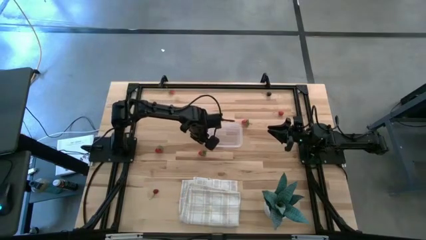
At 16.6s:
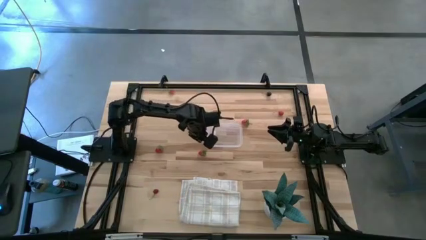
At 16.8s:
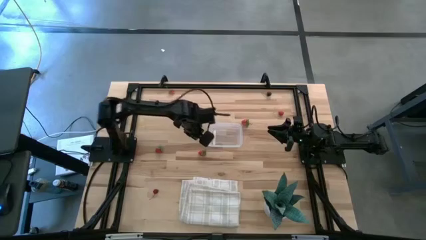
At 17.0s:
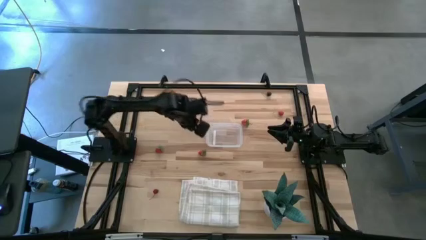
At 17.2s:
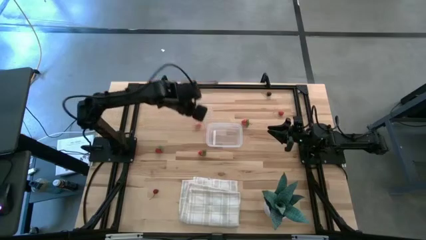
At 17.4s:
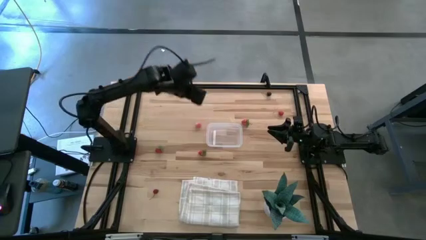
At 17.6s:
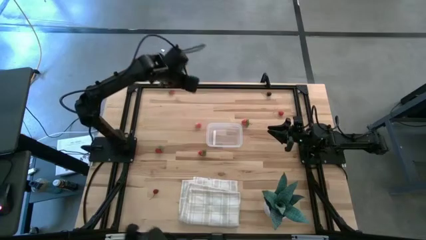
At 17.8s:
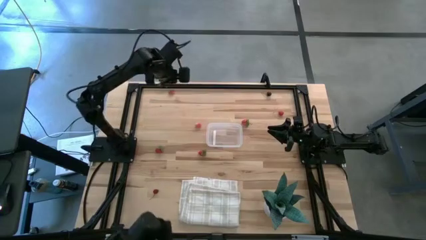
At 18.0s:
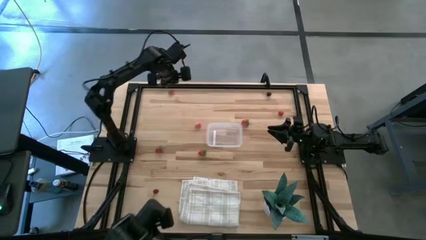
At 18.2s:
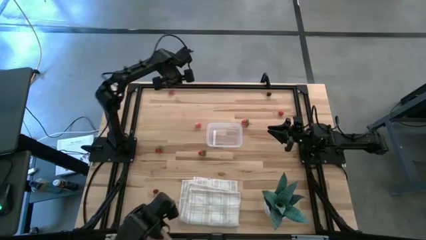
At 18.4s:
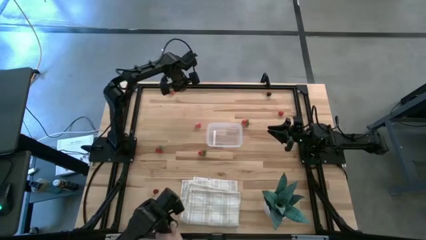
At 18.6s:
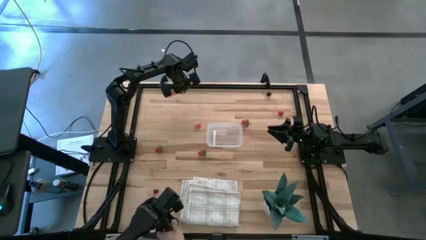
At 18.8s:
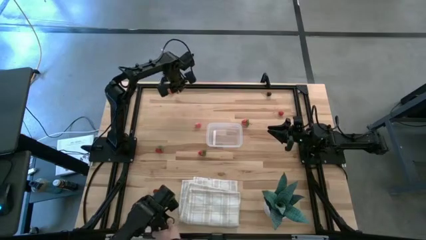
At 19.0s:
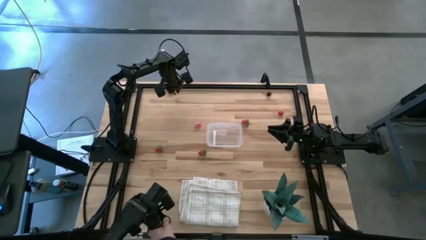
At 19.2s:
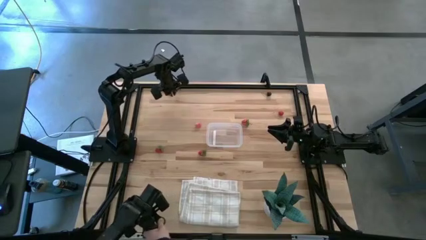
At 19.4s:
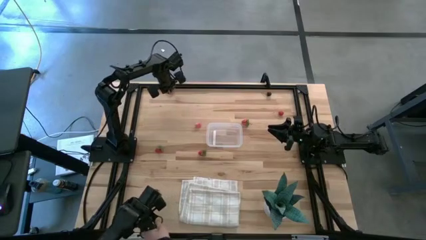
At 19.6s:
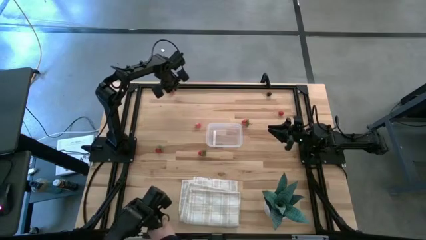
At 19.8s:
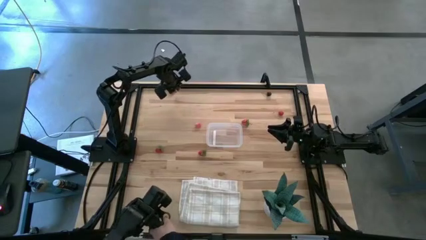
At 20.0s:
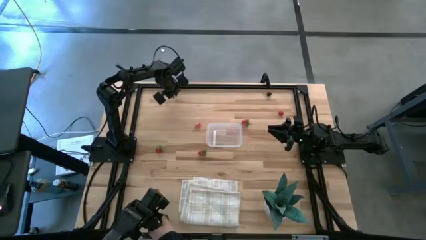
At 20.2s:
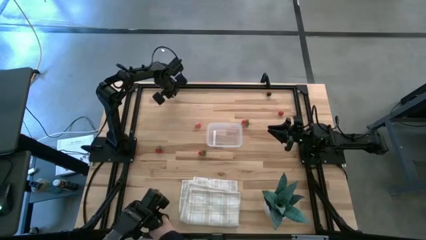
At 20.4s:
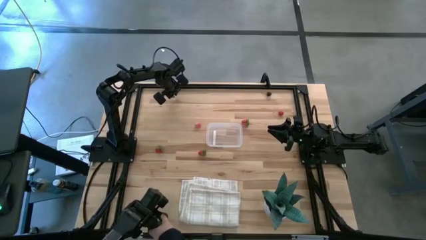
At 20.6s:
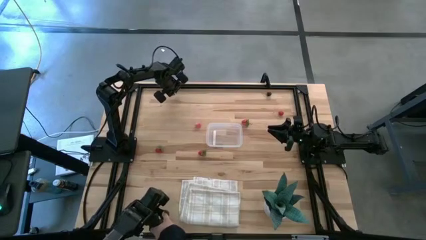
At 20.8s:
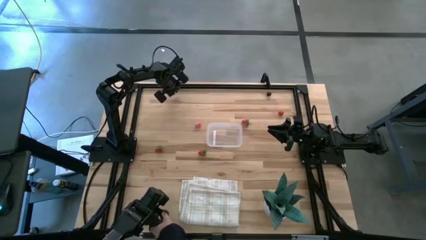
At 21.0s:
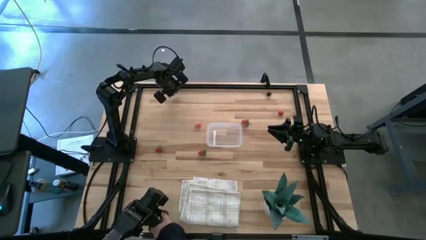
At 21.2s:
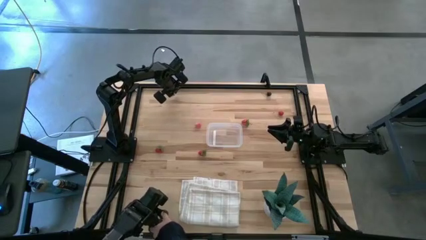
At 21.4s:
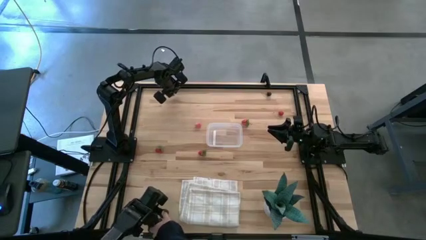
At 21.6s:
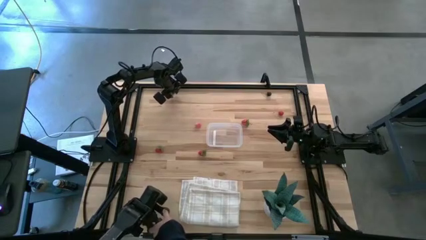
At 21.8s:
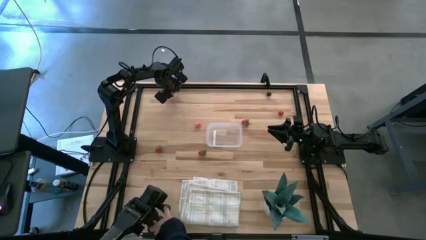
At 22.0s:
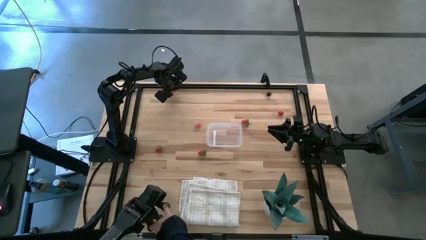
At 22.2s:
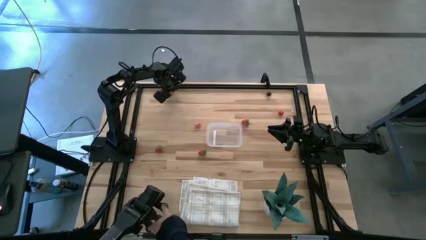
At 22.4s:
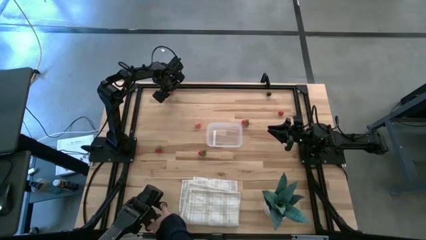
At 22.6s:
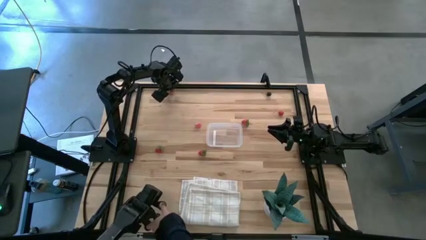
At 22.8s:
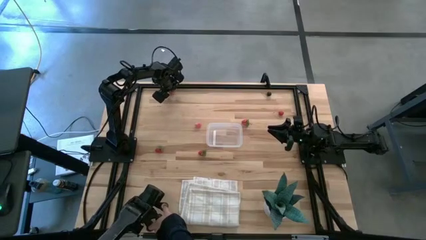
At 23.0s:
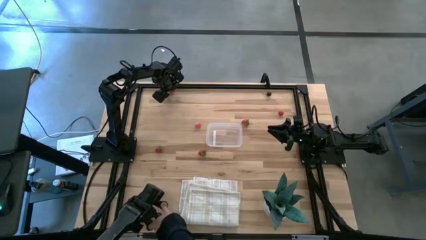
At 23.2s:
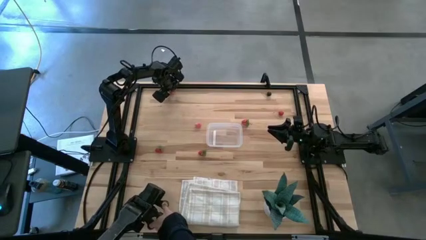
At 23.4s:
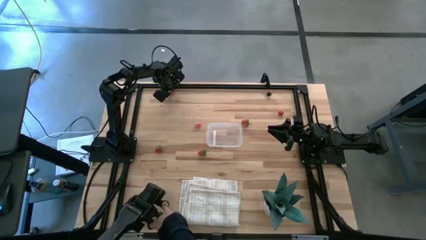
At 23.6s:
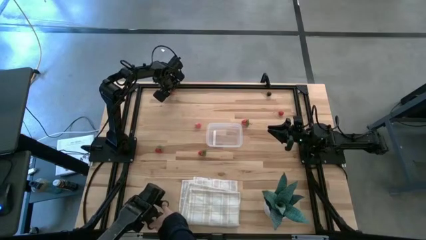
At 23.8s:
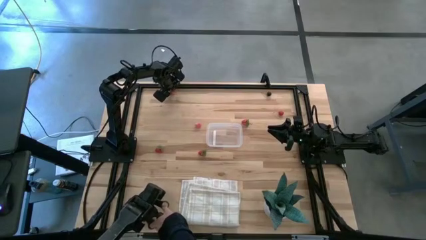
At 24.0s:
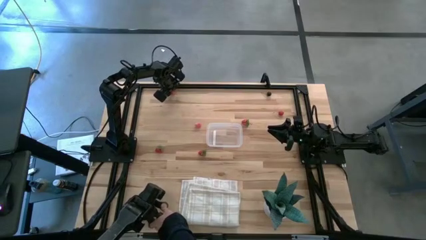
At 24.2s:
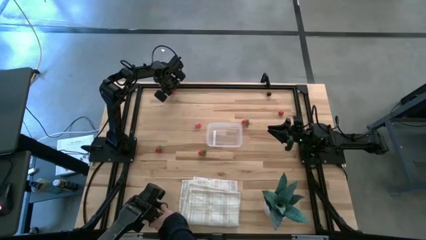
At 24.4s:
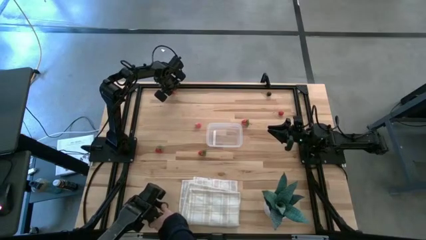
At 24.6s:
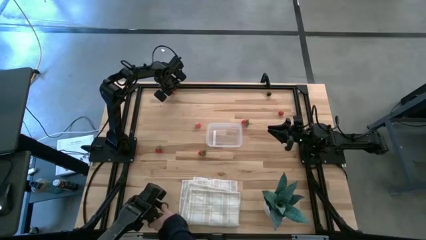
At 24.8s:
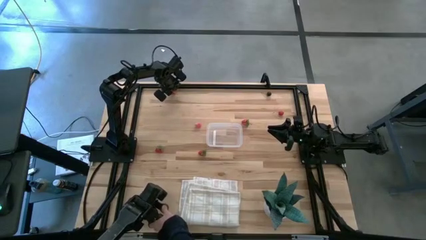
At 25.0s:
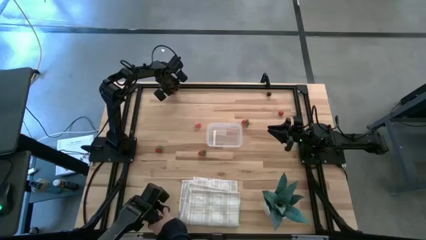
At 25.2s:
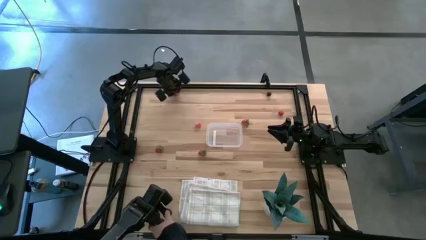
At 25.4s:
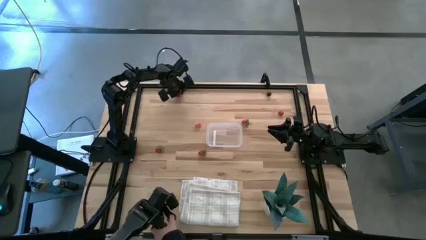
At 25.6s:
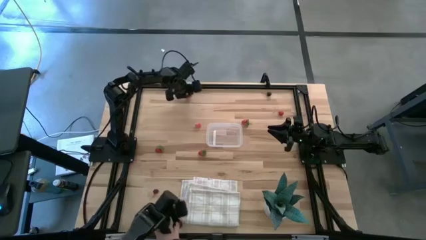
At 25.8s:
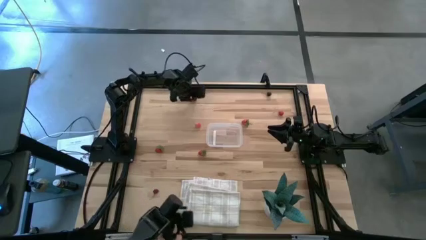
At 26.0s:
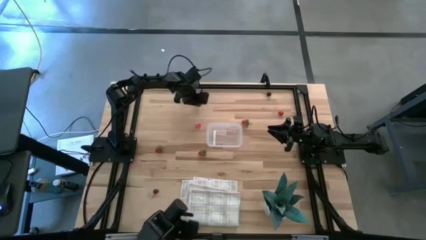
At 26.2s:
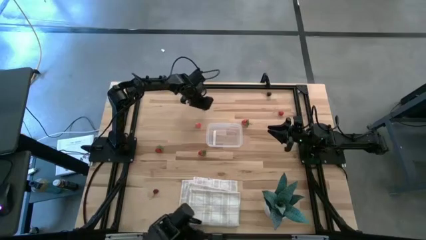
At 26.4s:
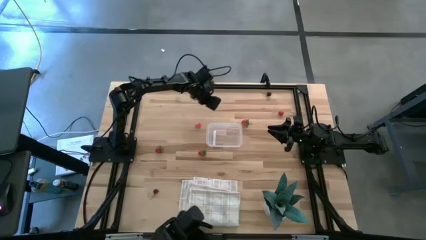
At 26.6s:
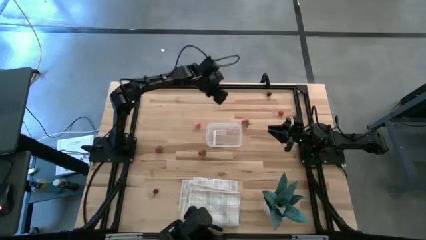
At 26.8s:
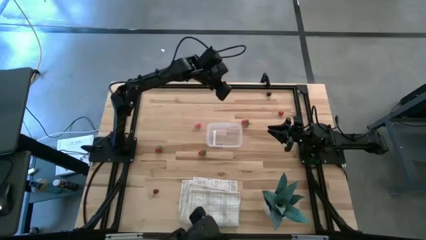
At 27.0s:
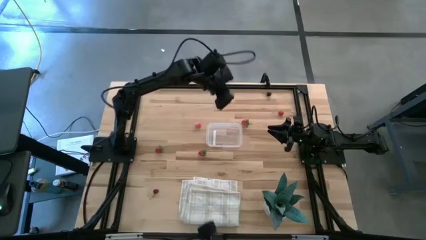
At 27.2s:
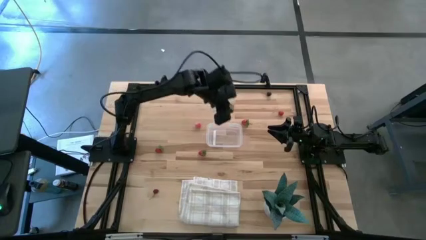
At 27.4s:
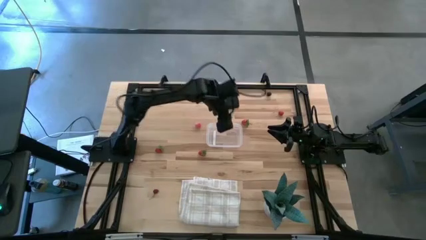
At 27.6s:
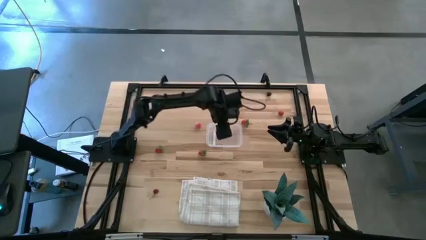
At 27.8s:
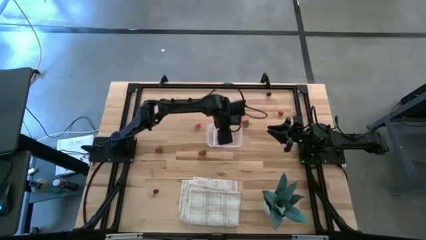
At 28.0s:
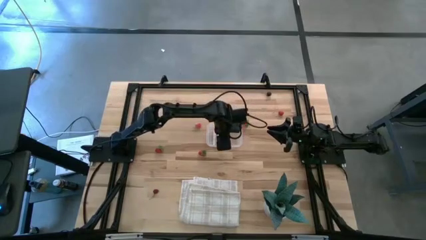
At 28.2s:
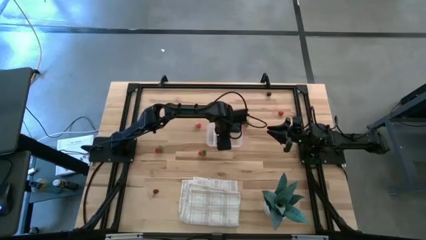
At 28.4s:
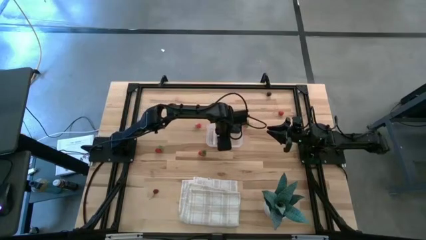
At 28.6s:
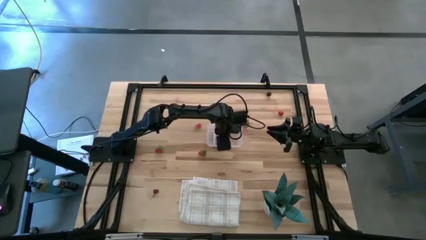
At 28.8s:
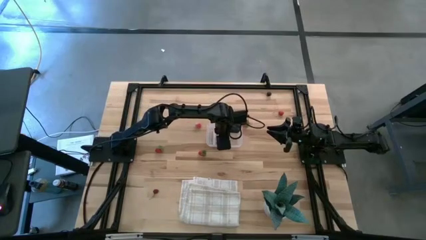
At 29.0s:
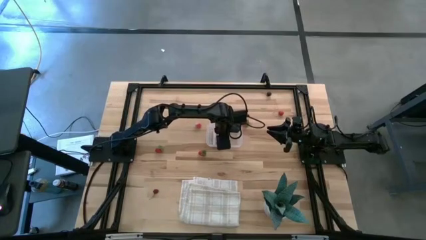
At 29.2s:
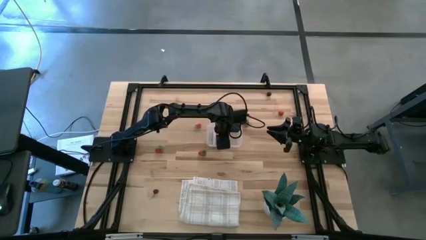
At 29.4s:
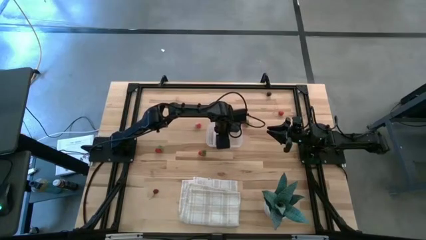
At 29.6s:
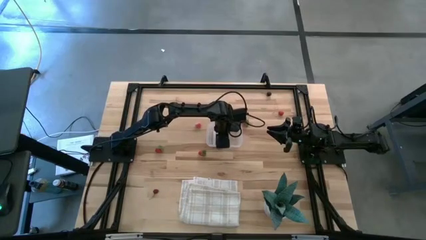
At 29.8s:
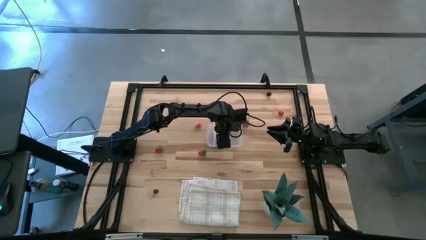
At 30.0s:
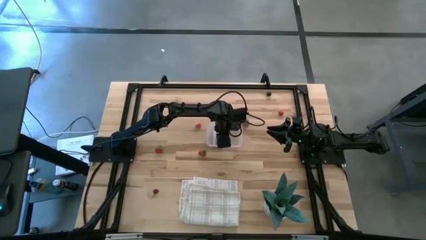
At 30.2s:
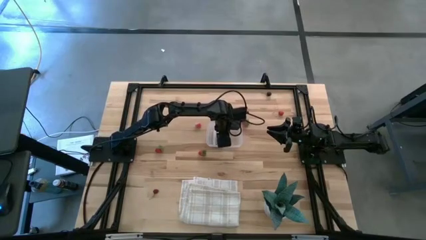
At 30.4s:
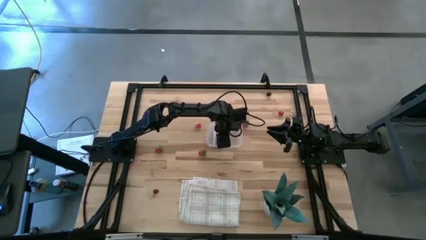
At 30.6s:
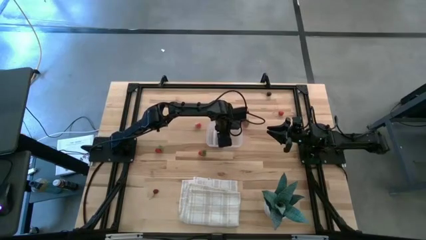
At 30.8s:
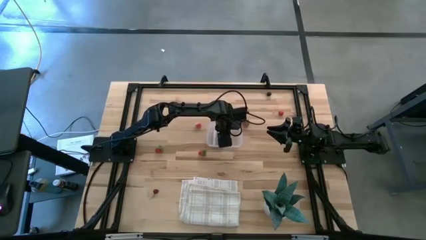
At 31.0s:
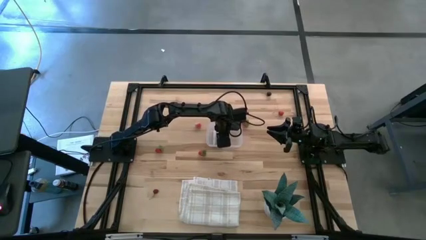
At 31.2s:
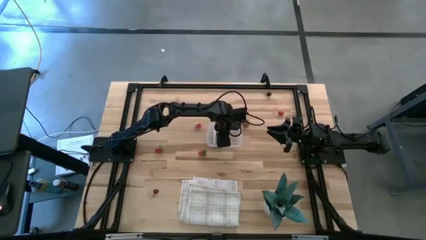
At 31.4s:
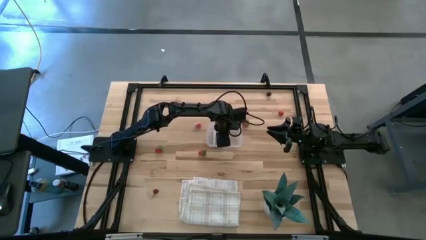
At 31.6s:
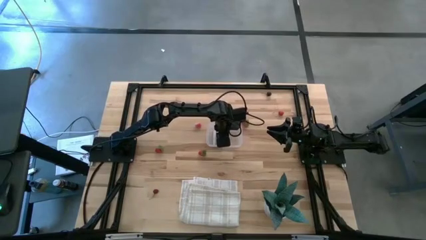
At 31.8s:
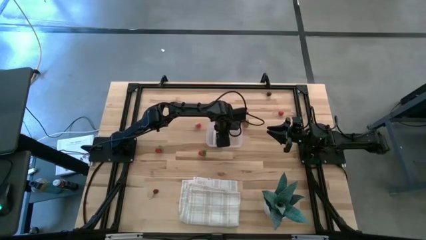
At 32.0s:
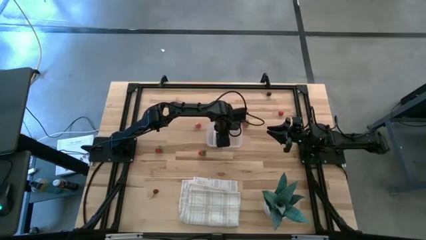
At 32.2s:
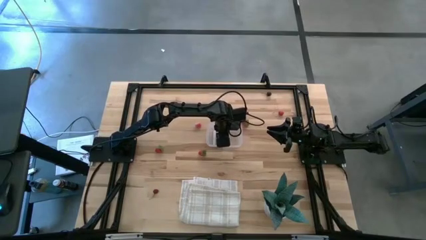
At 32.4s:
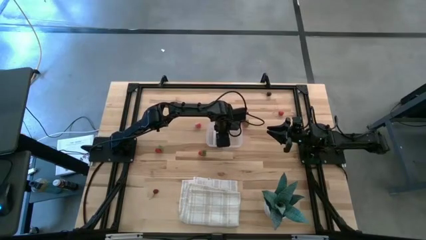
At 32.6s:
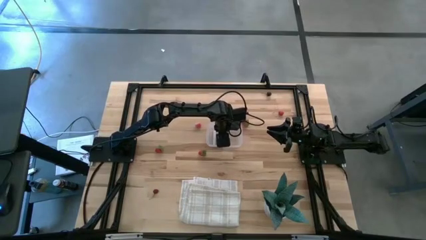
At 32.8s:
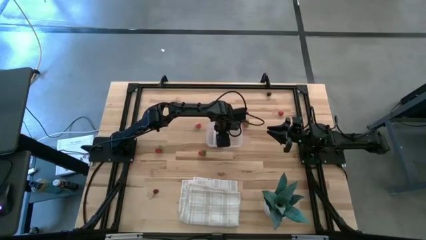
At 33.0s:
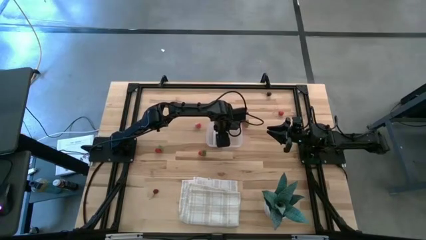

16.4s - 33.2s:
Task: Pick and placing Produce into tupperware
Put the strawberry into the transparent bin
